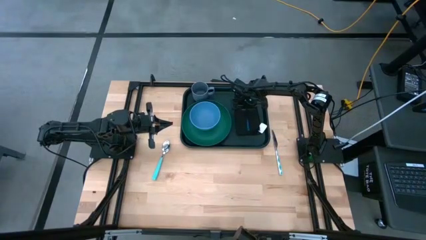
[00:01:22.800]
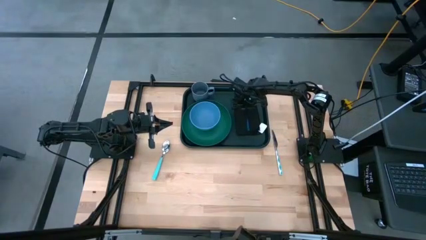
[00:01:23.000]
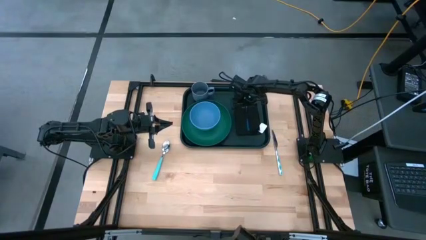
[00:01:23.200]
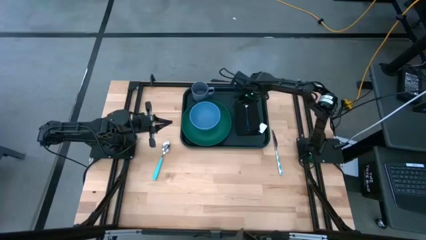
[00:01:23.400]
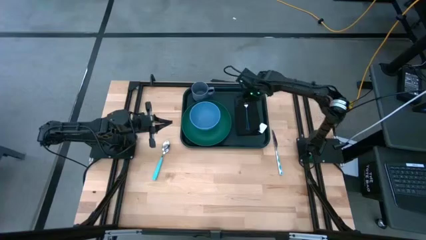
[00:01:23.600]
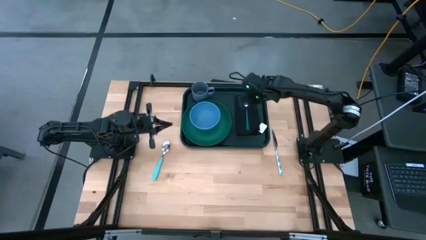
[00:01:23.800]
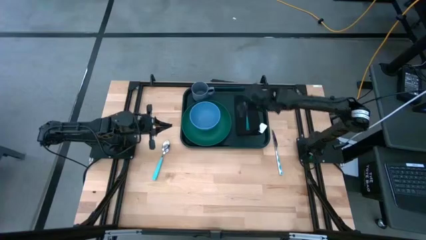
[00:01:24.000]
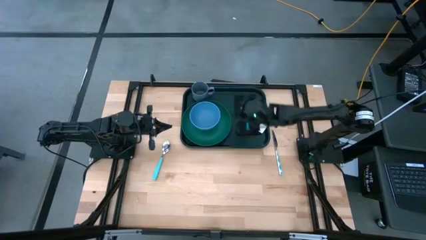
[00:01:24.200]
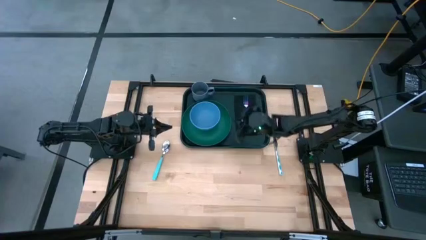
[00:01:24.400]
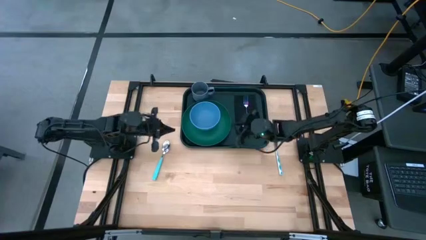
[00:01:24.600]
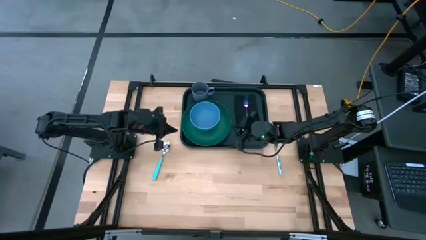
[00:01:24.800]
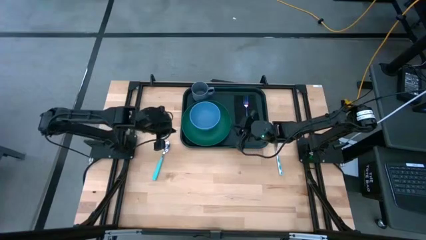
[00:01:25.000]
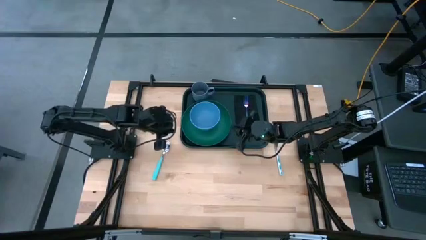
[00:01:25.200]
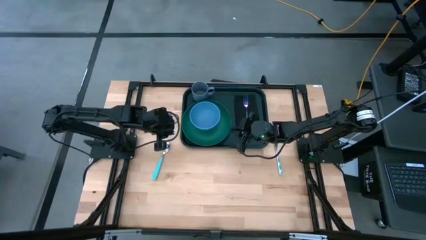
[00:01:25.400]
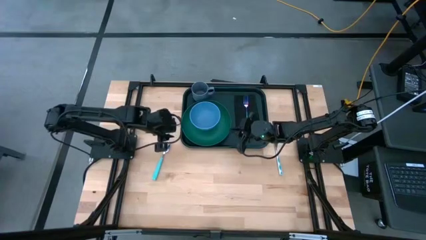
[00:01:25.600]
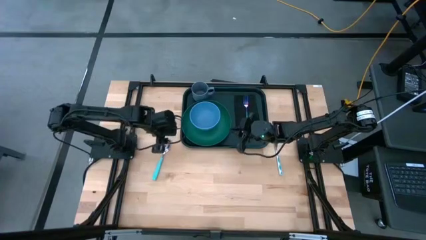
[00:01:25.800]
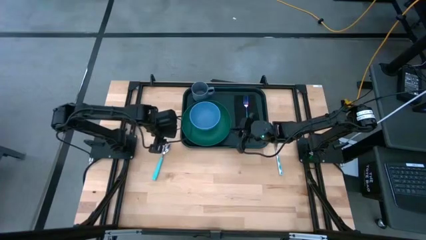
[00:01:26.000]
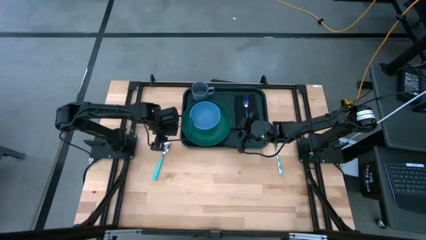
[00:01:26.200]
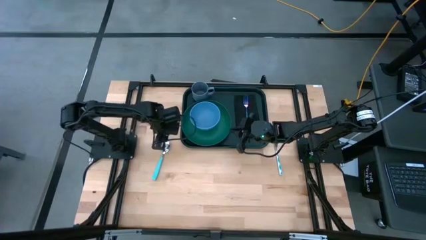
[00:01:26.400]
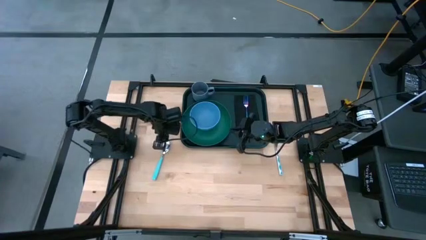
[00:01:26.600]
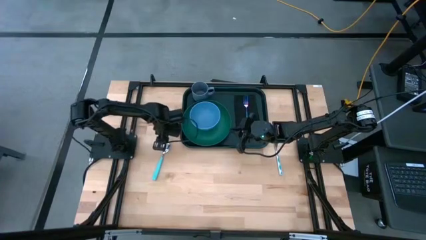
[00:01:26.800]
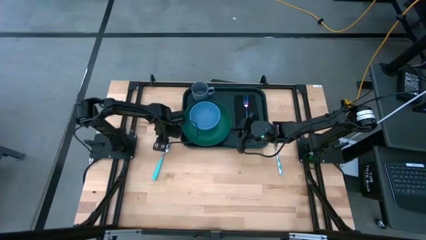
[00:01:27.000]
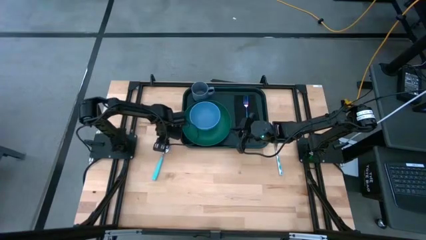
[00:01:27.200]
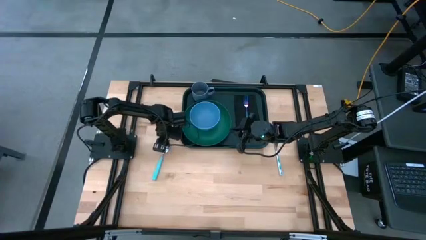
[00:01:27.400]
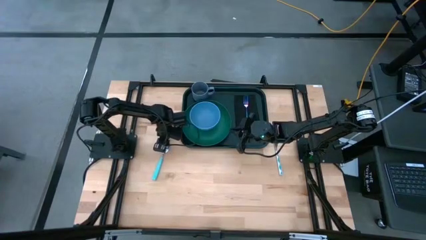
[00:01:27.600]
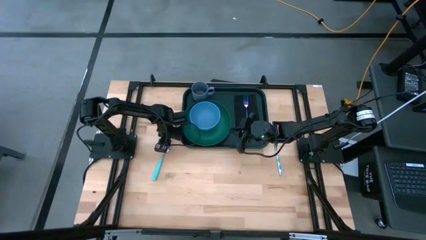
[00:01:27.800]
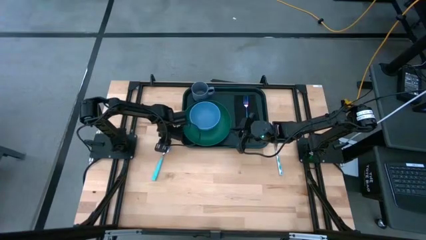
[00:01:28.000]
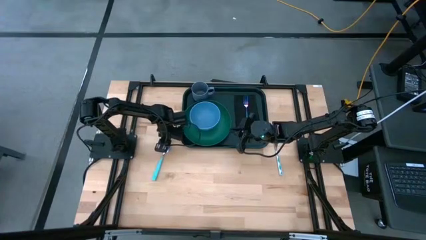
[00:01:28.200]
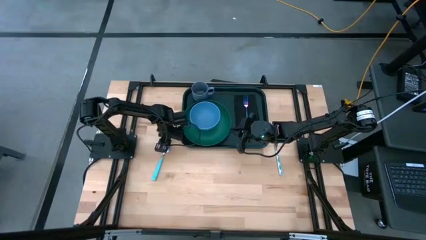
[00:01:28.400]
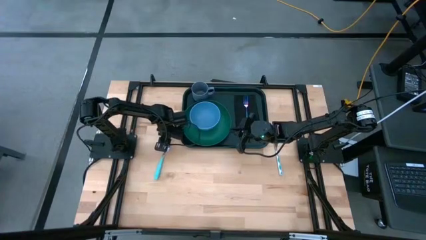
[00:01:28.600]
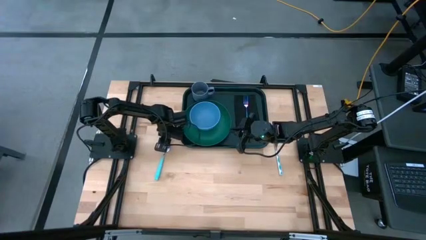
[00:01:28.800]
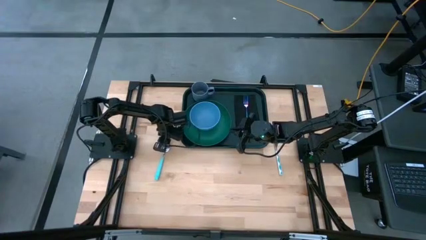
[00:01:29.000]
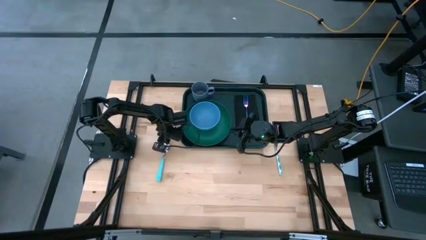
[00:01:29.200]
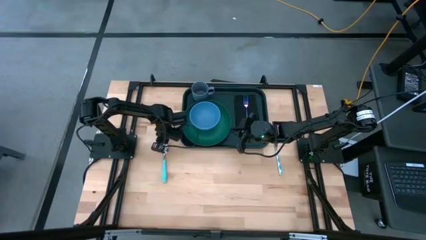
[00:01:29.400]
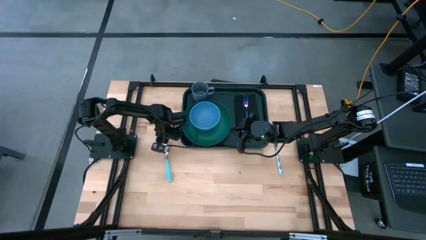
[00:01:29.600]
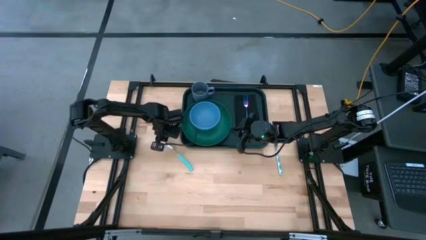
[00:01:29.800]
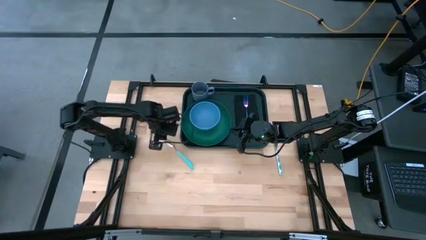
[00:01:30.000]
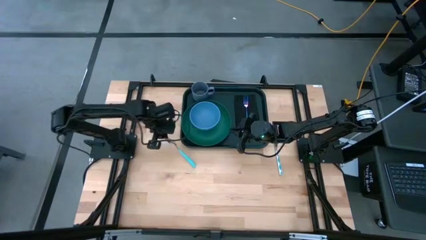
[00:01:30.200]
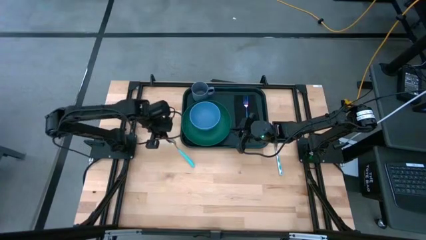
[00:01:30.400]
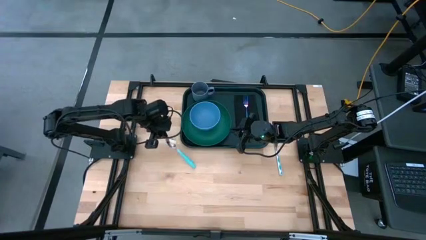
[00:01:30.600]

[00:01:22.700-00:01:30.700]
Task: Set up tray
Put the blue spoon to the left of the blue fork on the black napkin

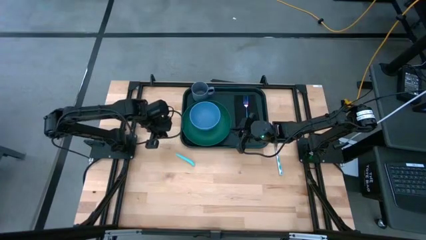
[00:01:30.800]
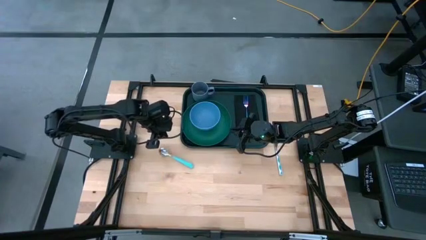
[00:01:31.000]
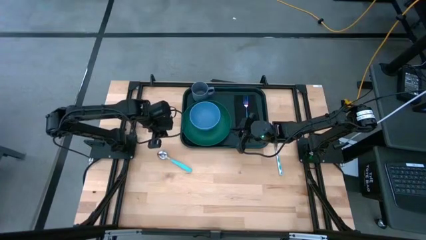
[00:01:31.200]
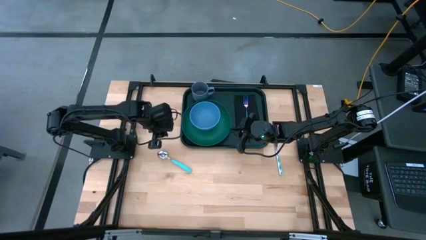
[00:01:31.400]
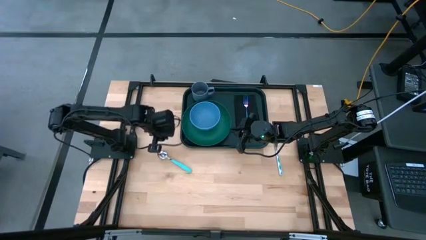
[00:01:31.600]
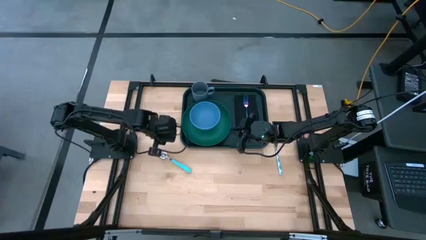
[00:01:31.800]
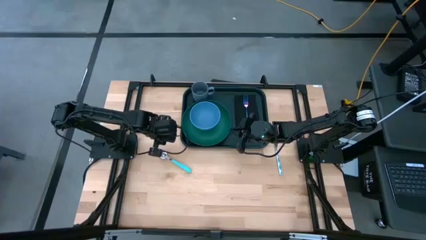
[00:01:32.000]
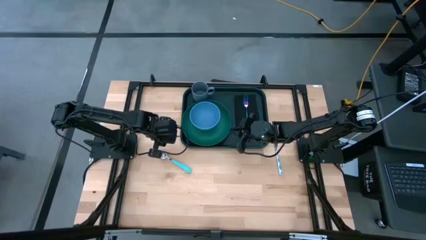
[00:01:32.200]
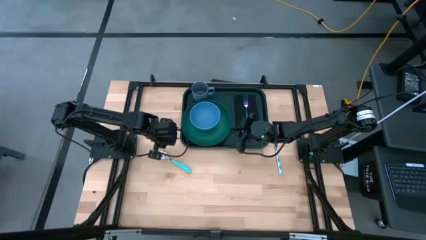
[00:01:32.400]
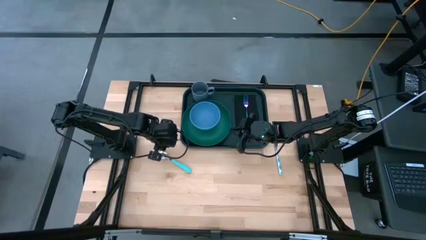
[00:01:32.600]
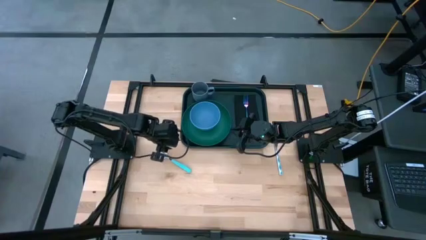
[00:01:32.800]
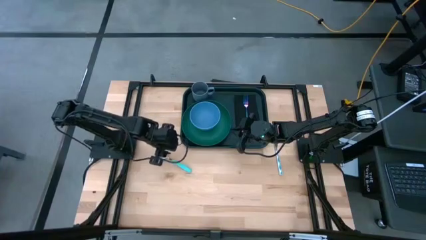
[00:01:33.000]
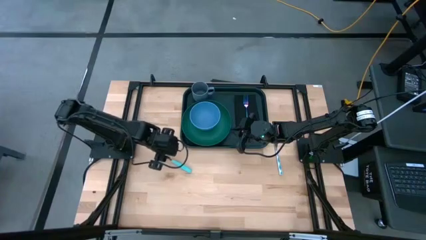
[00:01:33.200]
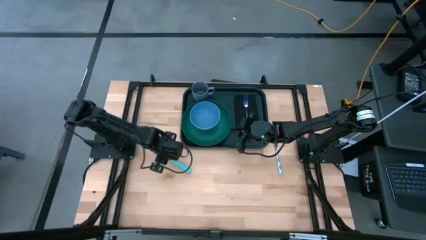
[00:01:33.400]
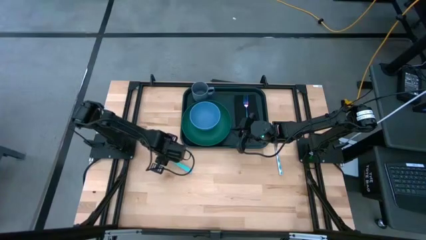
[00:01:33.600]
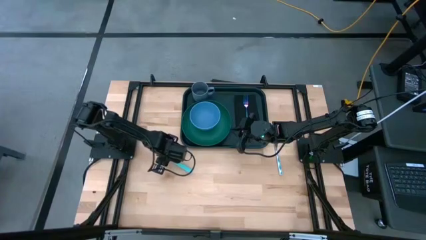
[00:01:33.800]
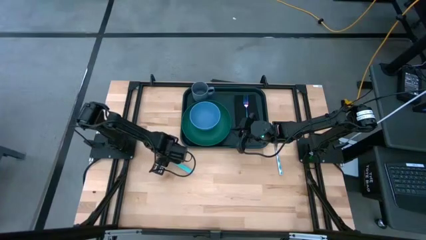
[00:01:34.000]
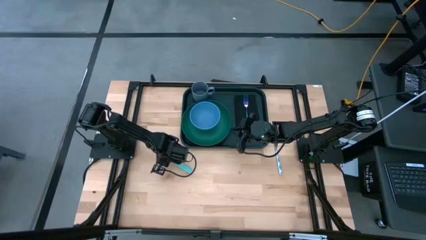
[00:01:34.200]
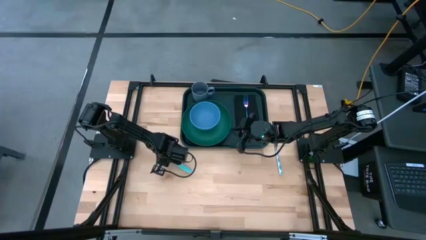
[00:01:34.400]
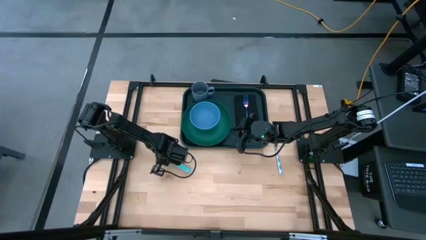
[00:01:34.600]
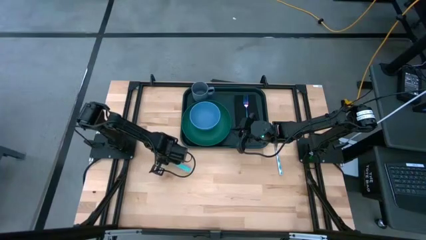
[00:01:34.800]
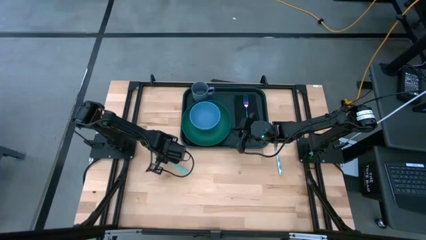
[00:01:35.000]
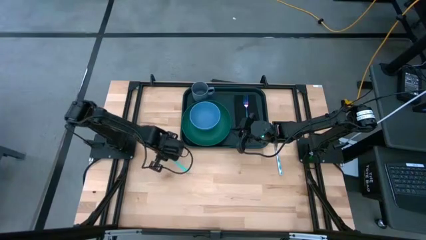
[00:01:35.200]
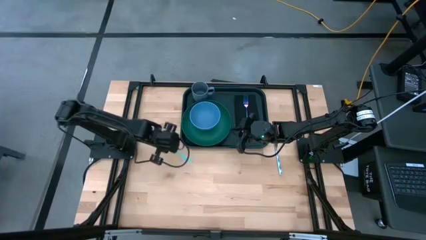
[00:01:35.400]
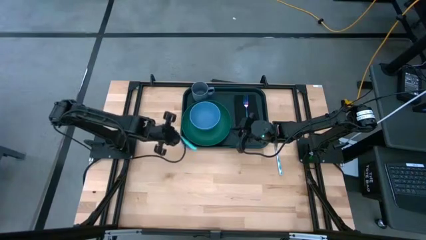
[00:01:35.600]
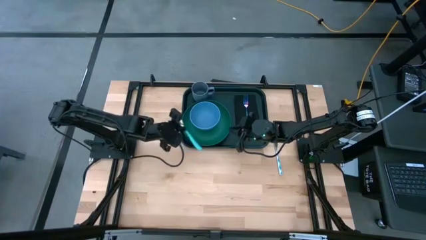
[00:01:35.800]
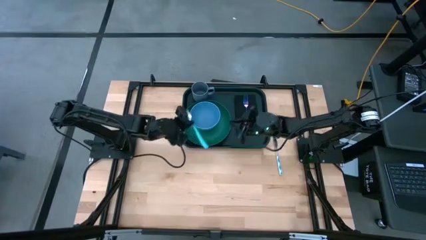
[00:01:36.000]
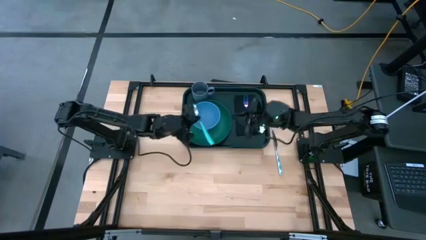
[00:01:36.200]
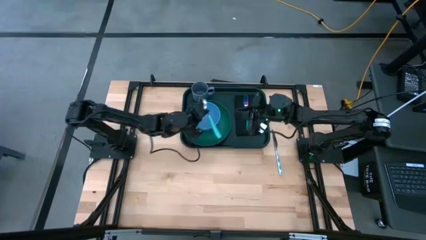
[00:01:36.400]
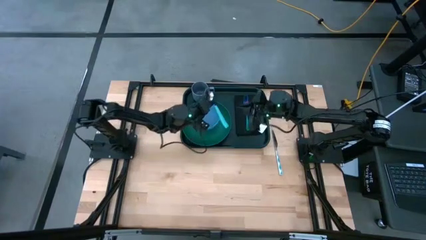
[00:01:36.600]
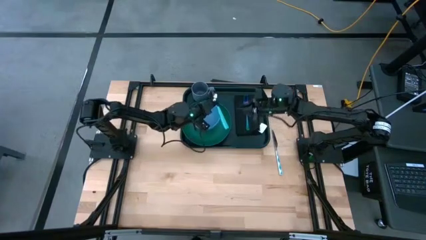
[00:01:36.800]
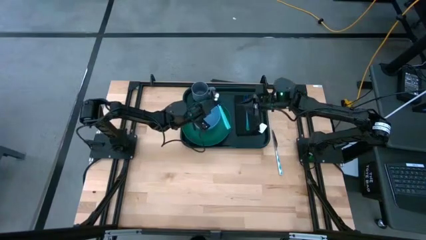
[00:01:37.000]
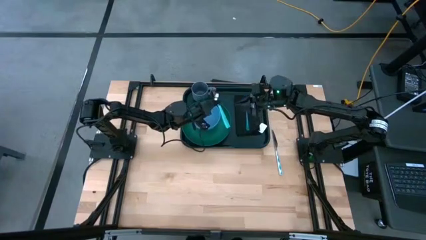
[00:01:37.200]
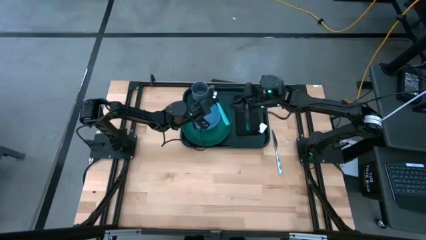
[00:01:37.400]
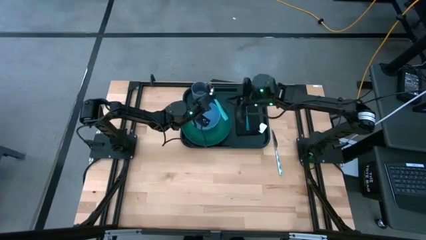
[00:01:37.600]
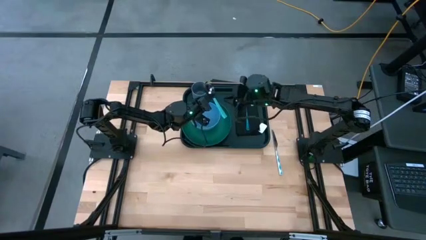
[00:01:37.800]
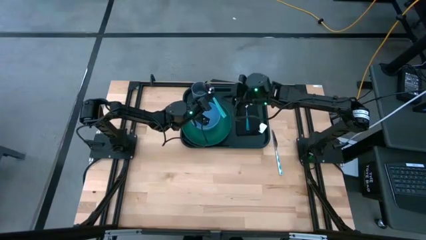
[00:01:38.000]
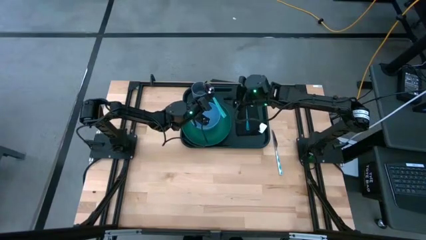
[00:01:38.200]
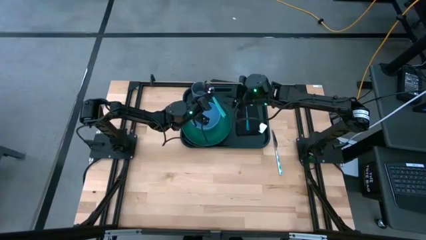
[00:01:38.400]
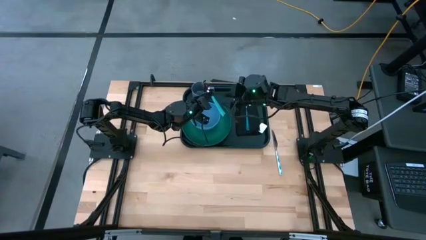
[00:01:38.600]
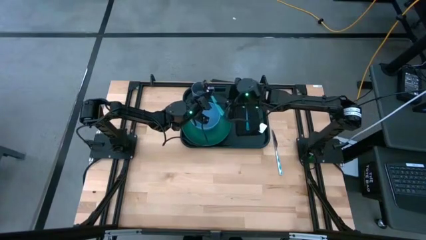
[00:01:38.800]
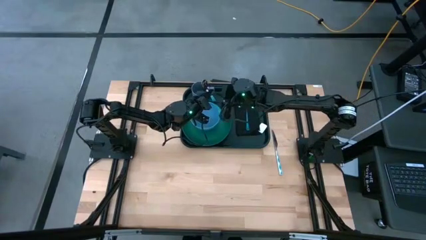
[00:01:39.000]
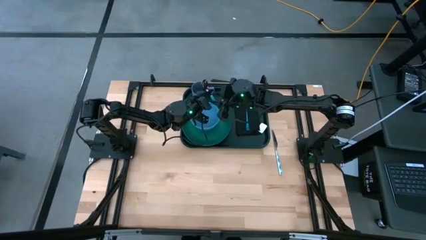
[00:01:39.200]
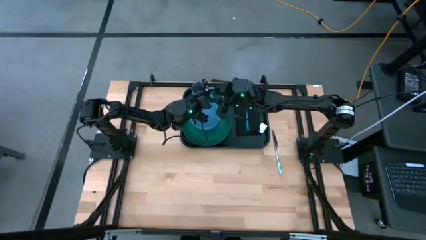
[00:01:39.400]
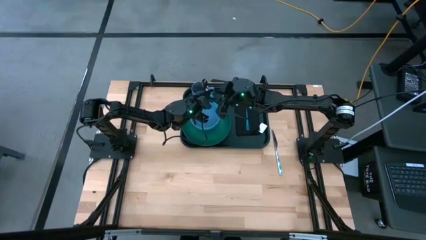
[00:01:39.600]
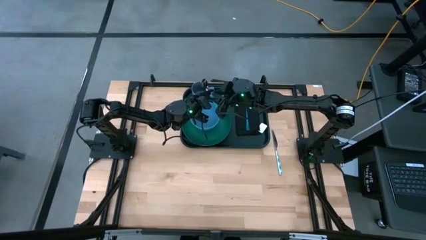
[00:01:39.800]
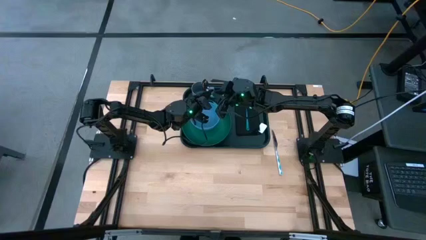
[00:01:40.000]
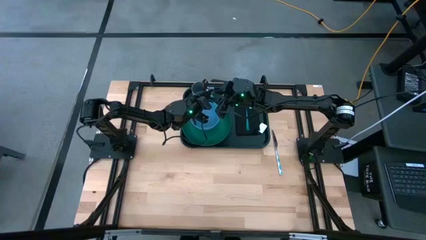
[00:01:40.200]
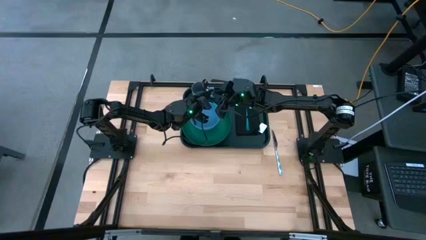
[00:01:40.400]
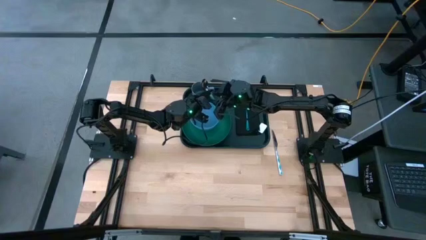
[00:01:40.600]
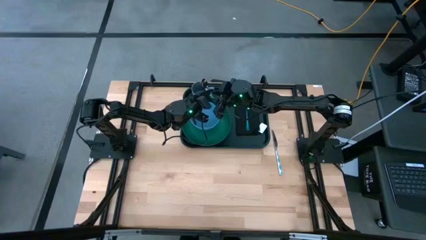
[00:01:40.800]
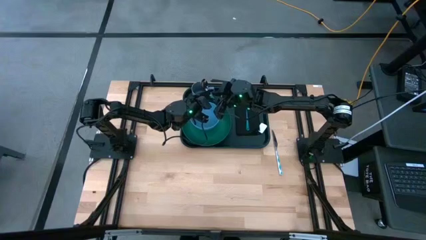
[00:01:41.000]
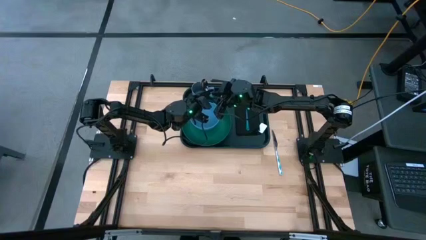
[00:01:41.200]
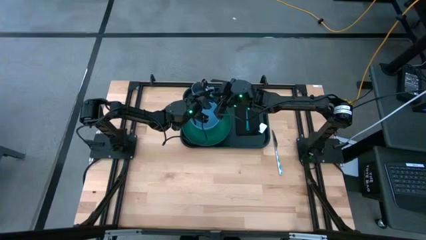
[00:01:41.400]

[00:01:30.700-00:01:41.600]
Put the blue spoon to the left of the blue fork on the black napkin
